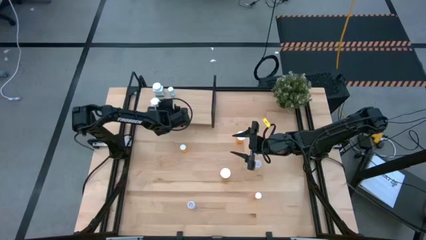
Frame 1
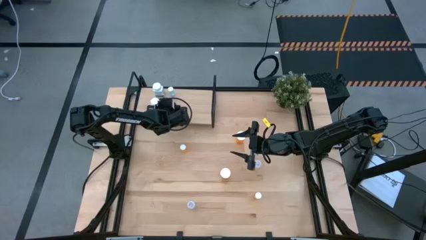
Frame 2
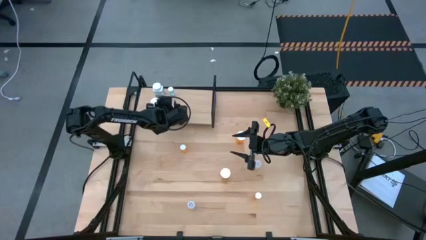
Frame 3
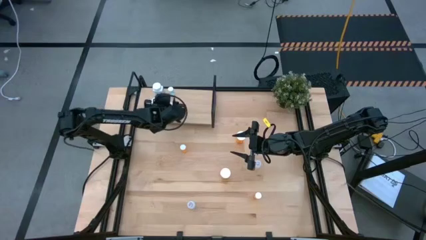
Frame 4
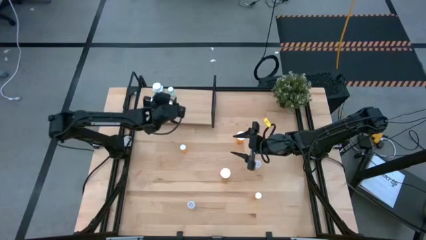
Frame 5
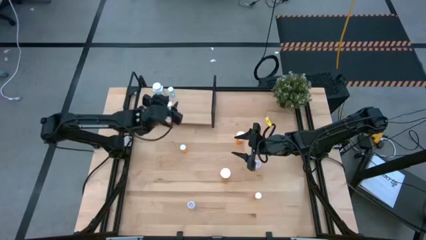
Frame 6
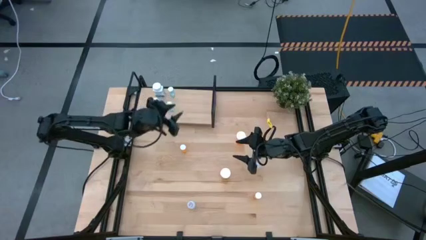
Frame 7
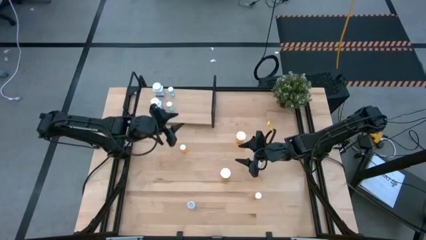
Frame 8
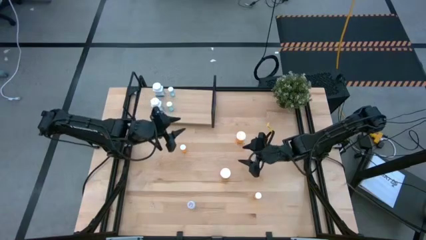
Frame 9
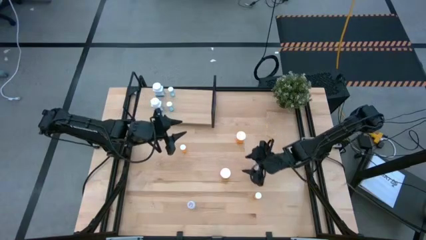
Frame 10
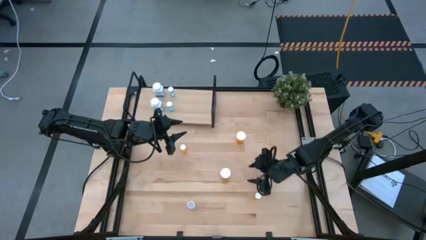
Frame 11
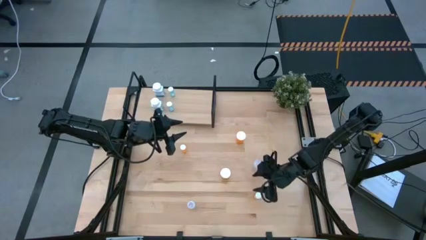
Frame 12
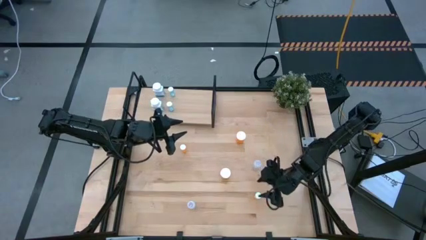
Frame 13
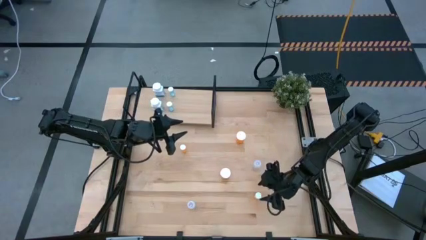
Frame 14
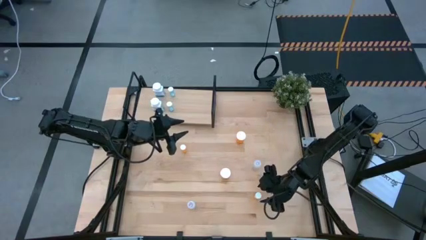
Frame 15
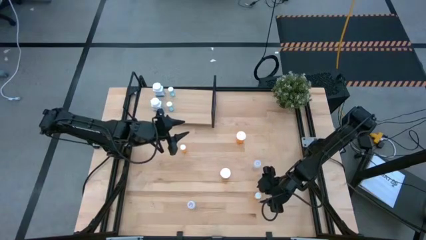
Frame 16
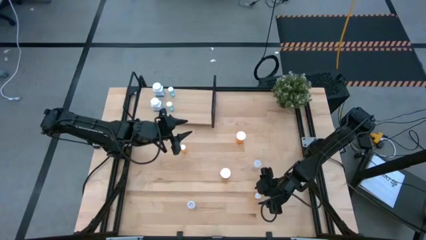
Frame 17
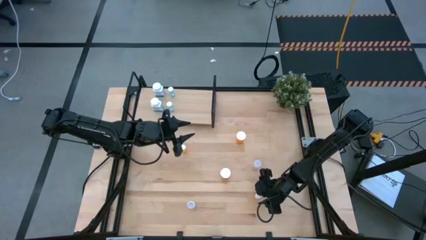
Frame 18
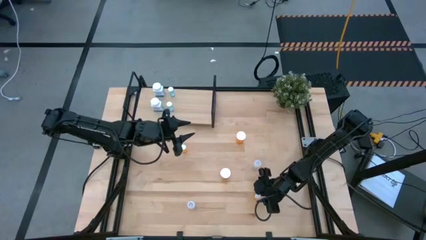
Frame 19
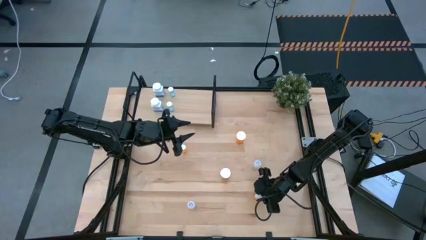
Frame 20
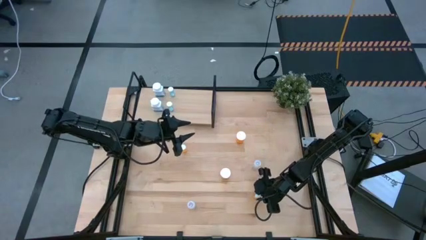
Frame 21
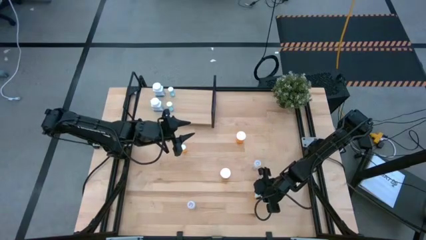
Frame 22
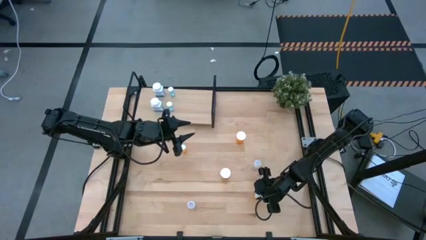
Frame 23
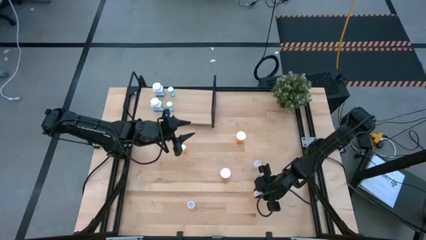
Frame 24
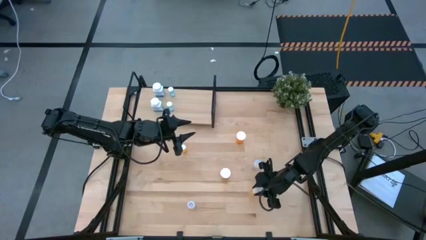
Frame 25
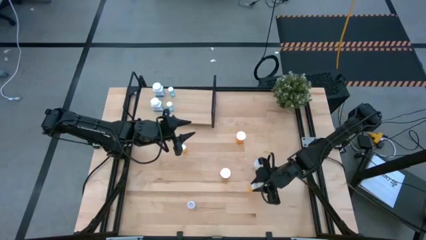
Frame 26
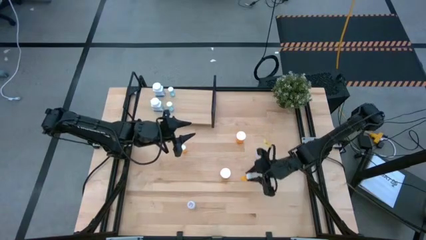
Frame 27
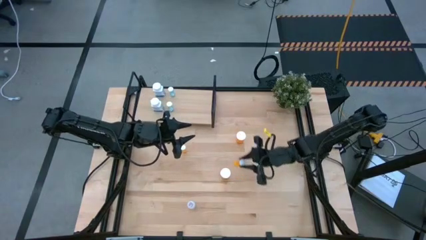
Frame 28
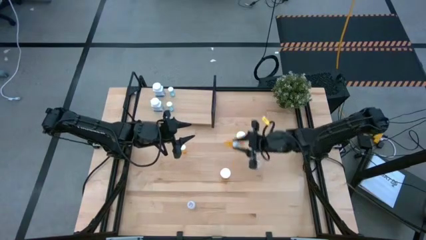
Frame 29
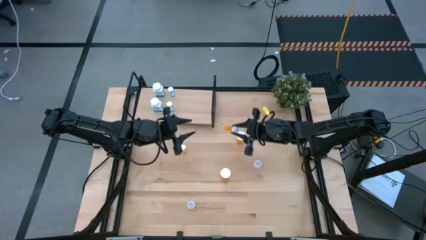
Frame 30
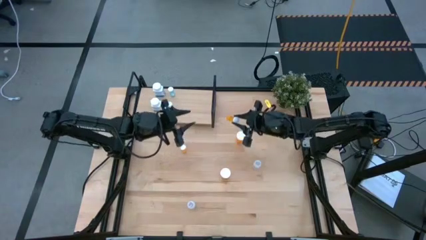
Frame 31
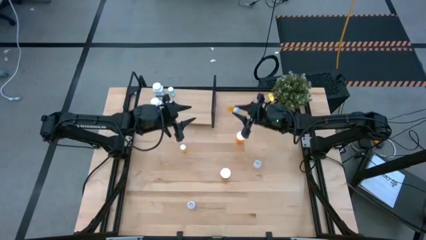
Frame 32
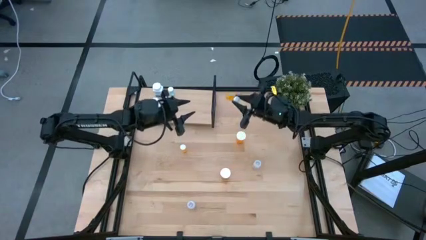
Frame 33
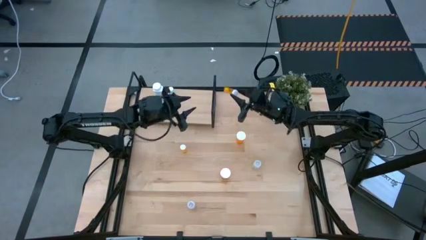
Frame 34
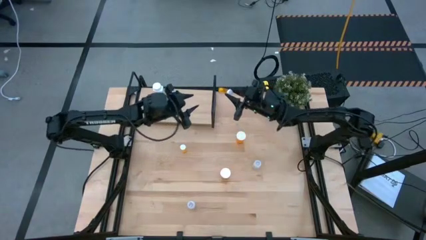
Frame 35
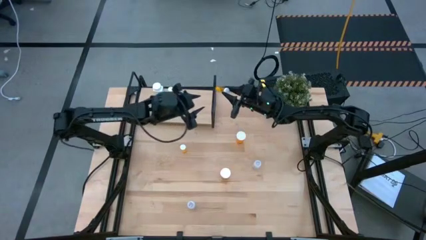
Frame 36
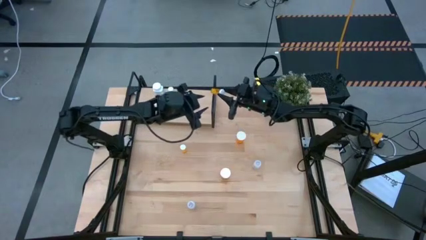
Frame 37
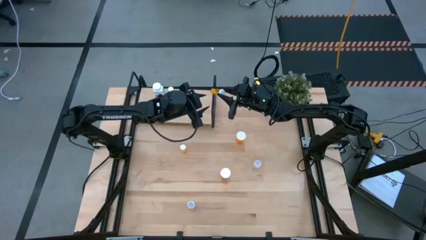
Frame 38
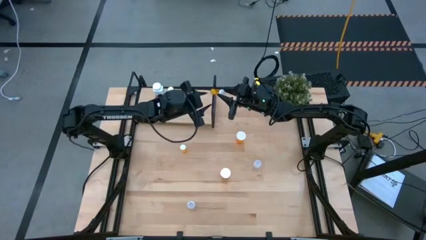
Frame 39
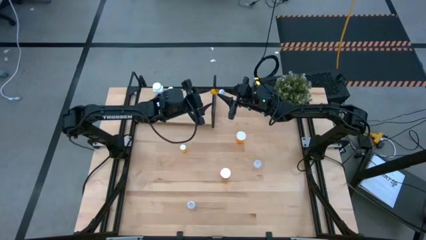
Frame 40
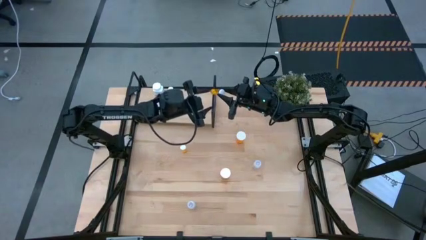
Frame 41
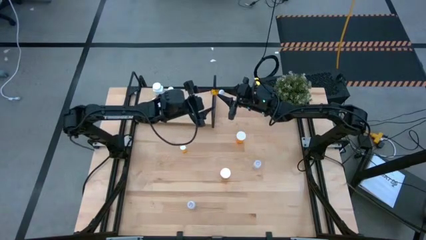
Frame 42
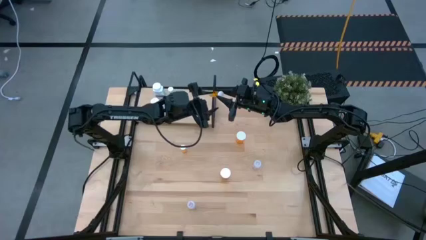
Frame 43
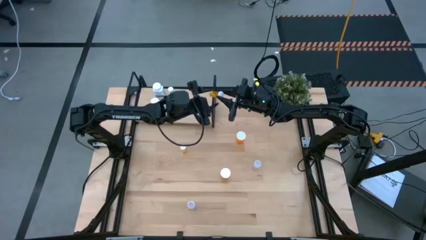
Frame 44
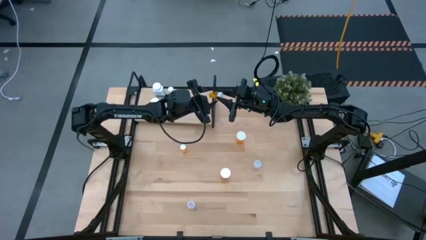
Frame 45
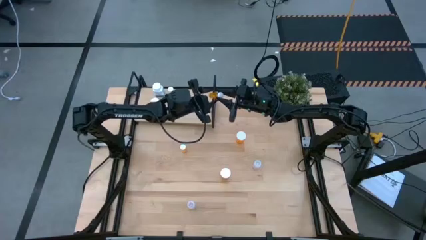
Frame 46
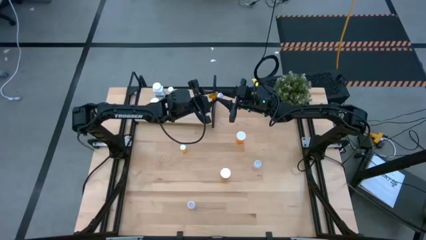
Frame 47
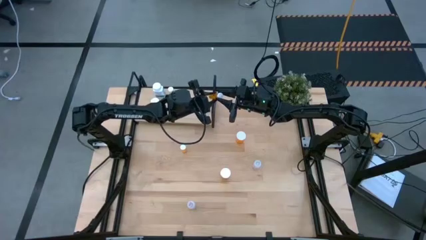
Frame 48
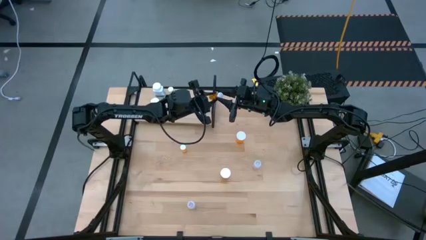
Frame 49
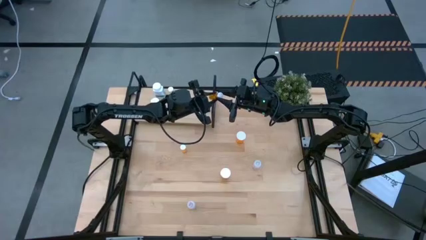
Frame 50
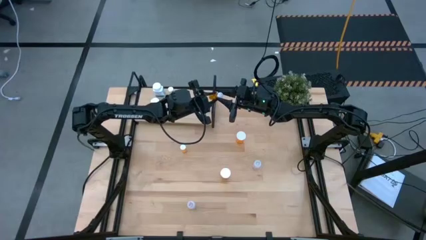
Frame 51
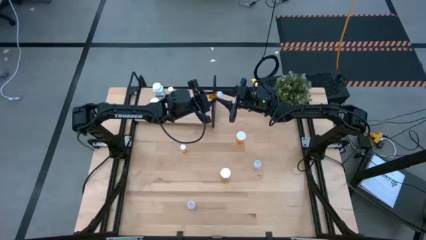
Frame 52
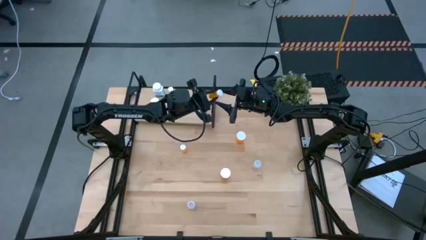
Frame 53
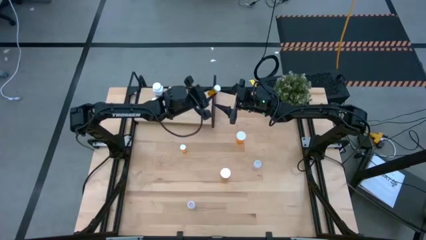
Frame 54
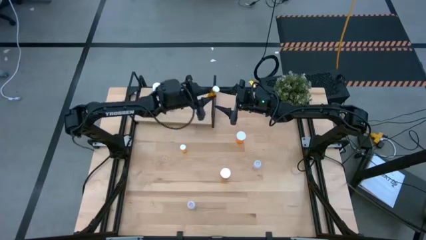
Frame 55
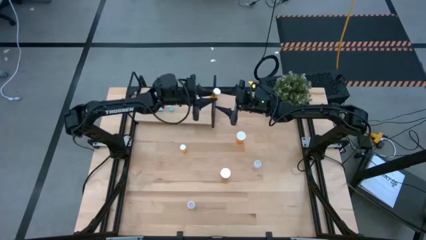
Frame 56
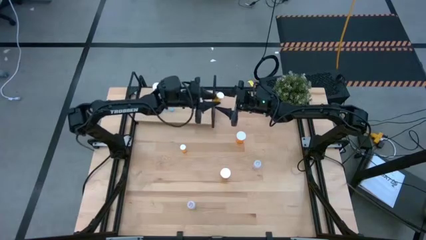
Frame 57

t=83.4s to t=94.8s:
Task: Pick and place medicine bottles onto shelf by color
Put the bottom small orange pill bottle on the shelf

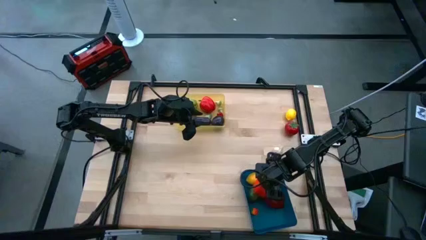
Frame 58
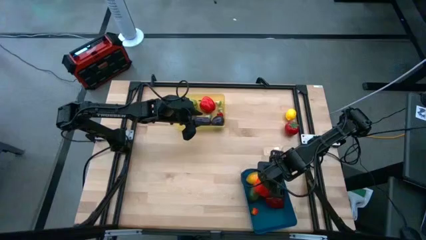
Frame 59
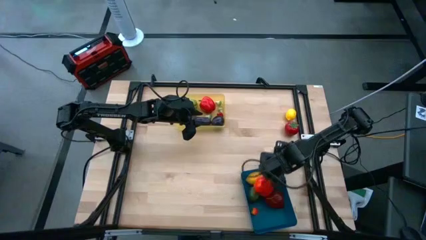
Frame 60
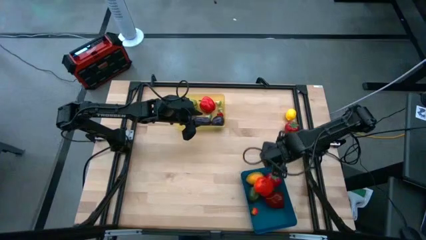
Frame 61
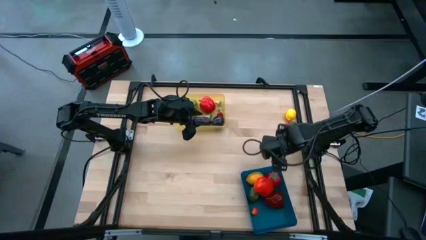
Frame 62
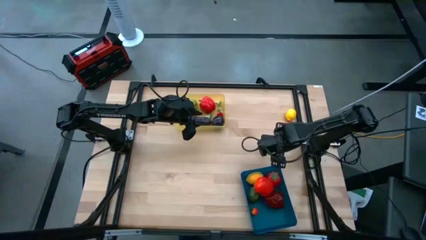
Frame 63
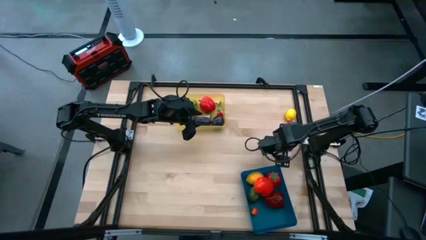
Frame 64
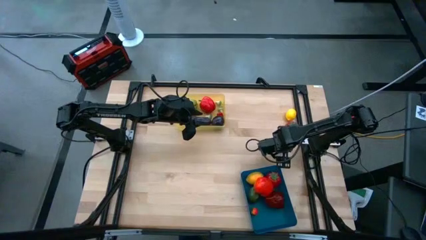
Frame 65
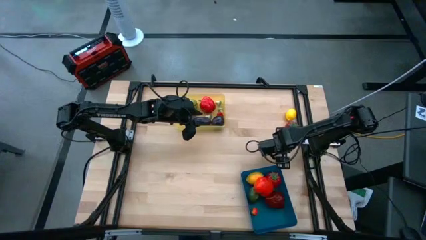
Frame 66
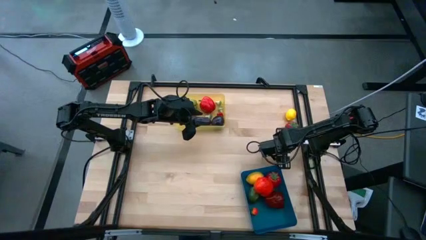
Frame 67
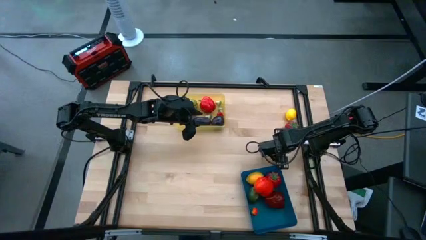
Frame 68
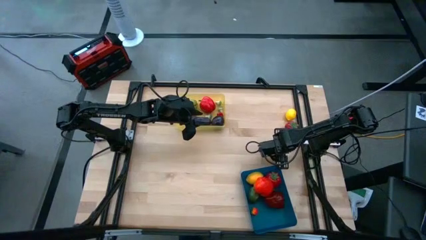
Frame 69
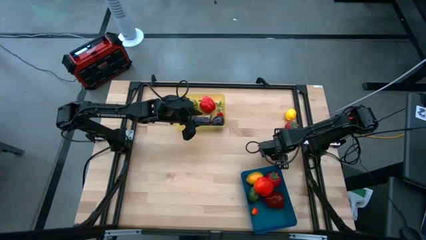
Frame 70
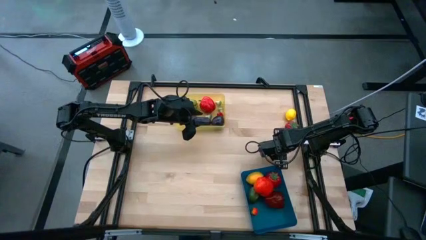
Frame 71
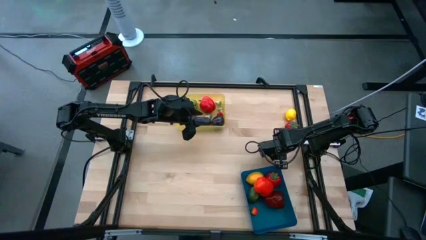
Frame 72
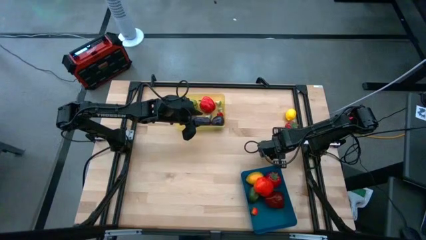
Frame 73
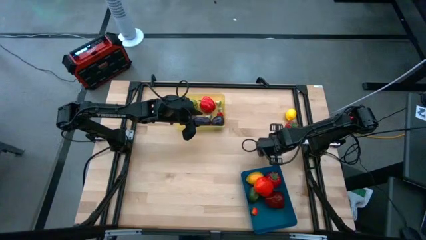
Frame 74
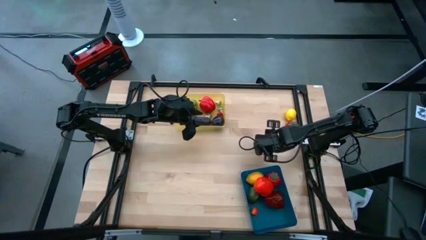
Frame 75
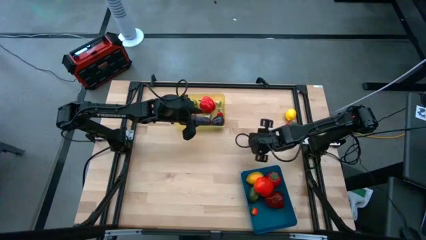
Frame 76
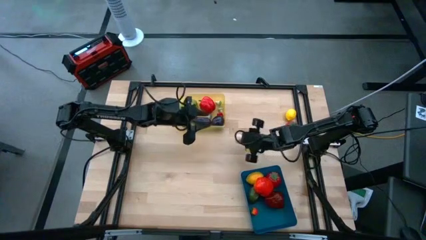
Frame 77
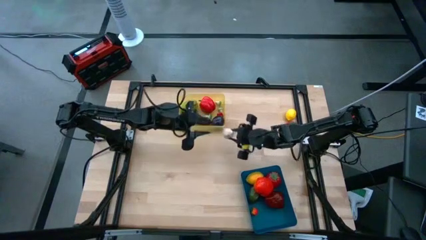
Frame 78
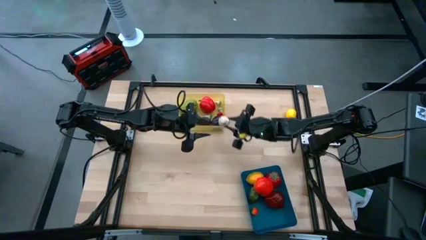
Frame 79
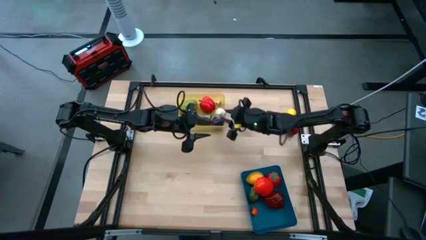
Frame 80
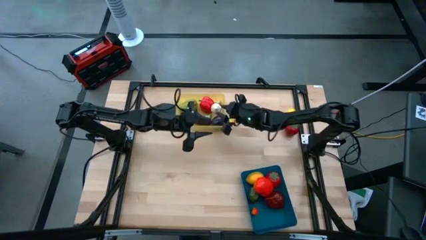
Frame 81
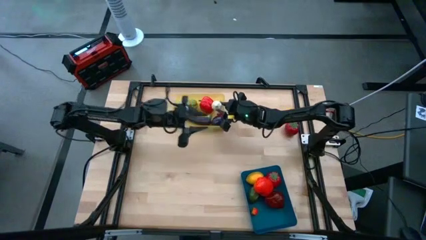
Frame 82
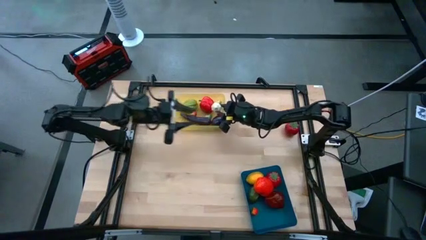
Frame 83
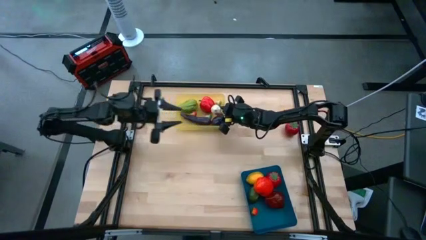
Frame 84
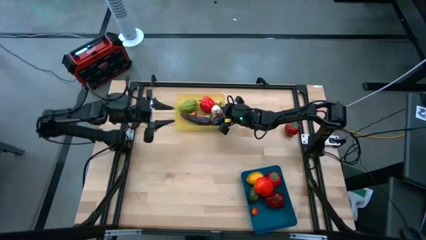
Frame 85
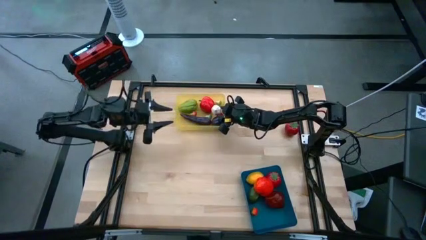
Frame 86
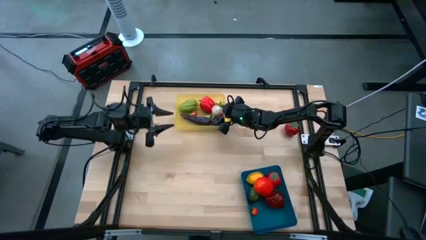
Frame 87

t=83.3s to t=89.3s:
Task: Sort produce into baskets
Put the white garlic into the yellow bin
